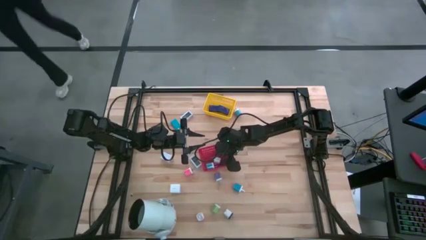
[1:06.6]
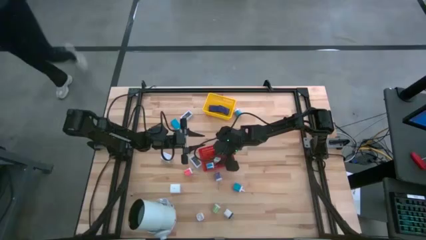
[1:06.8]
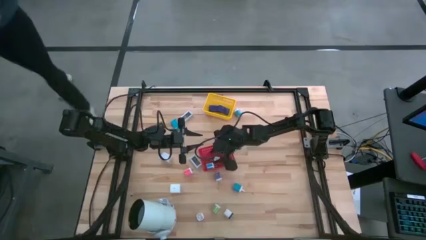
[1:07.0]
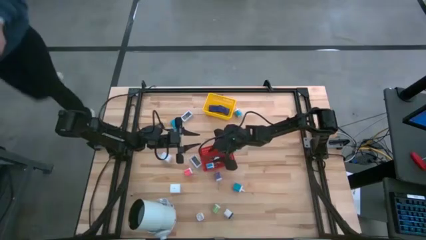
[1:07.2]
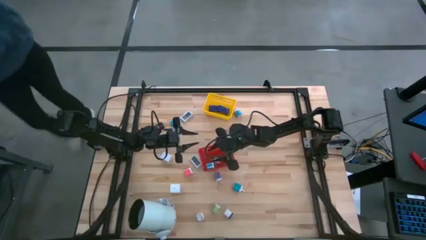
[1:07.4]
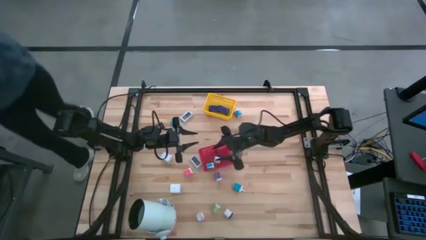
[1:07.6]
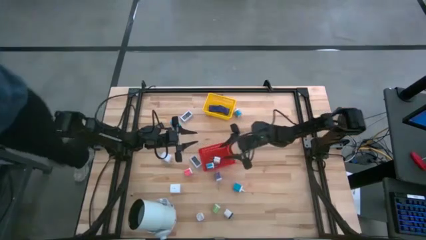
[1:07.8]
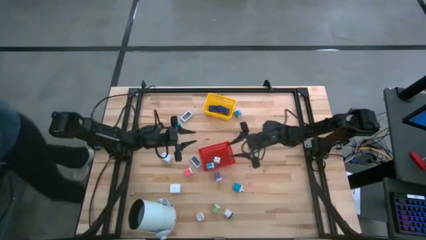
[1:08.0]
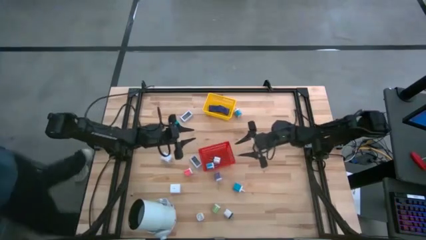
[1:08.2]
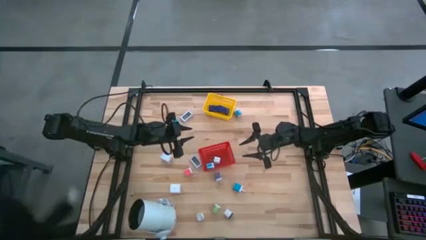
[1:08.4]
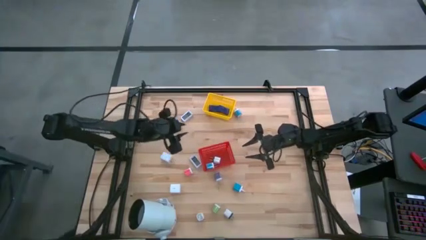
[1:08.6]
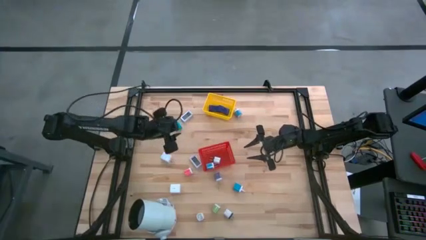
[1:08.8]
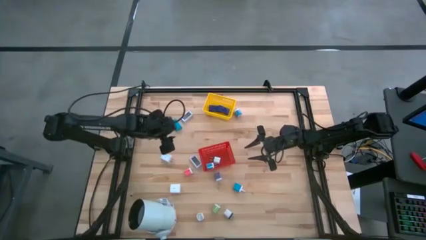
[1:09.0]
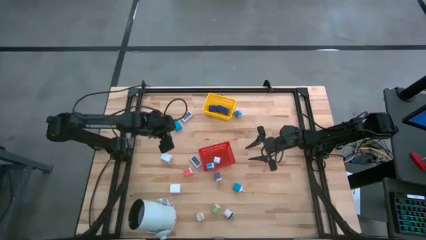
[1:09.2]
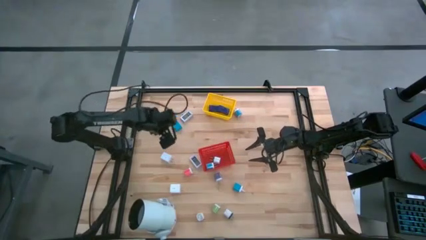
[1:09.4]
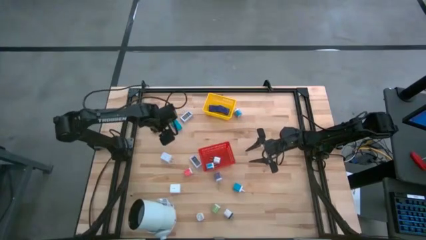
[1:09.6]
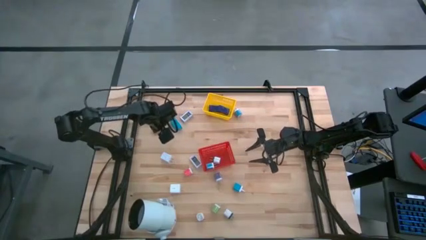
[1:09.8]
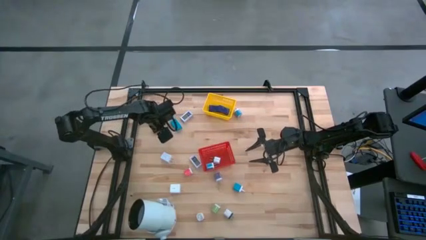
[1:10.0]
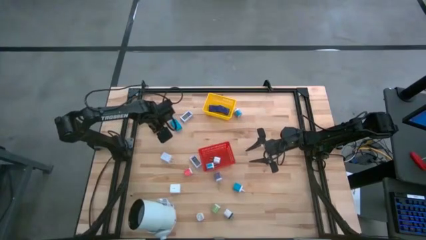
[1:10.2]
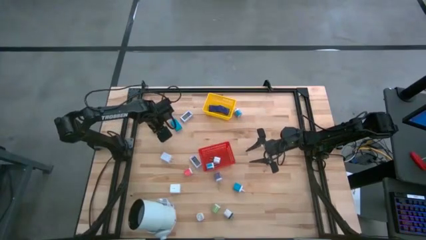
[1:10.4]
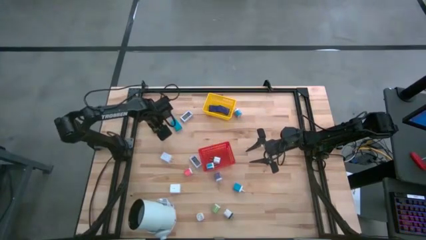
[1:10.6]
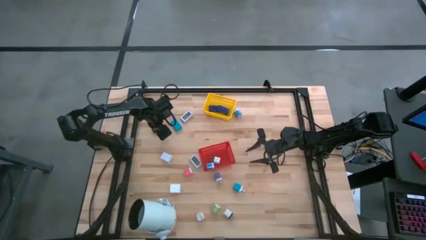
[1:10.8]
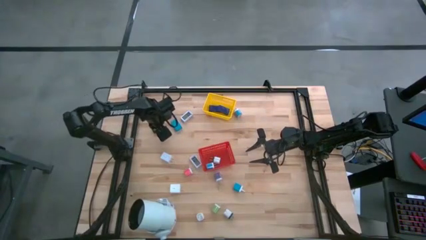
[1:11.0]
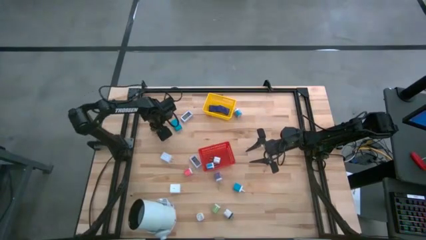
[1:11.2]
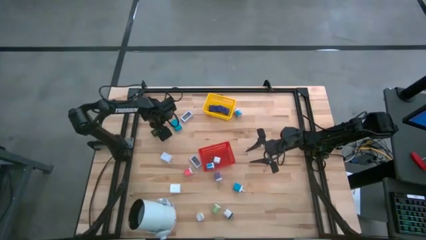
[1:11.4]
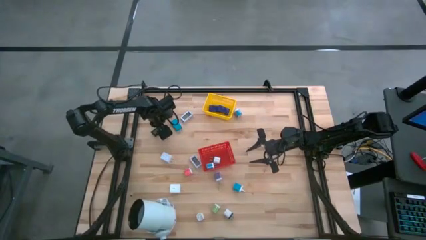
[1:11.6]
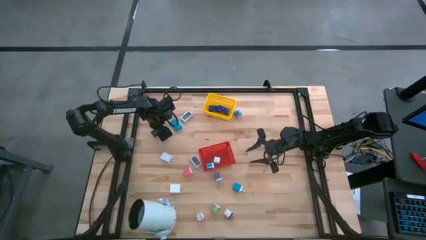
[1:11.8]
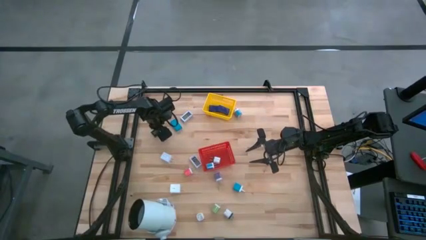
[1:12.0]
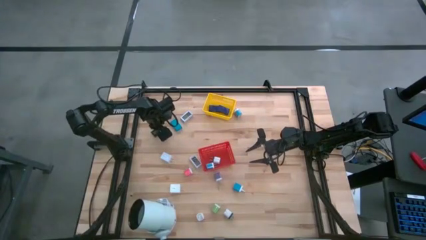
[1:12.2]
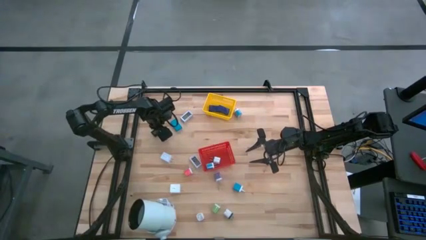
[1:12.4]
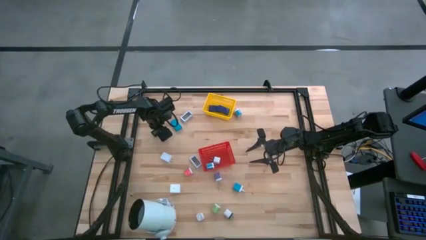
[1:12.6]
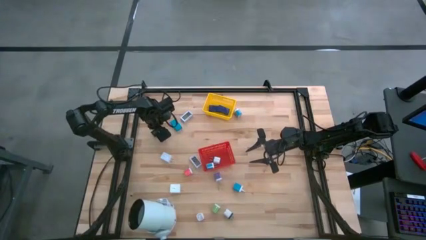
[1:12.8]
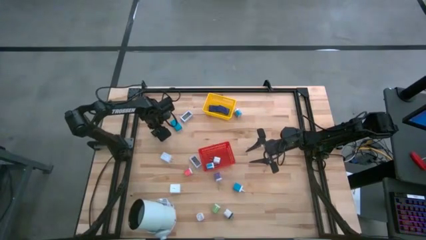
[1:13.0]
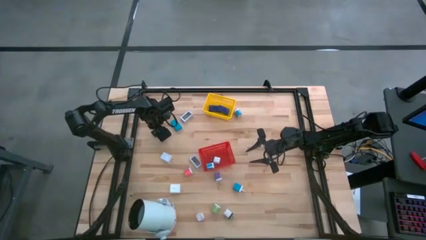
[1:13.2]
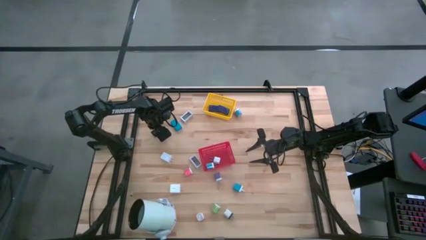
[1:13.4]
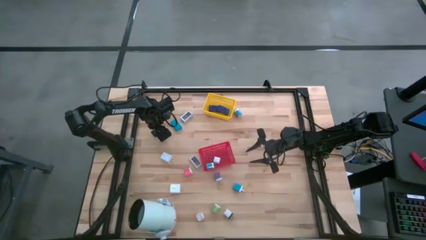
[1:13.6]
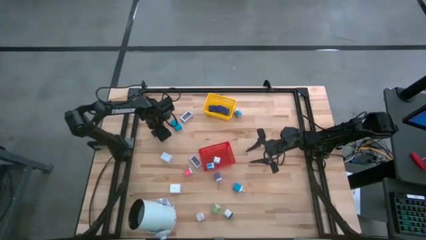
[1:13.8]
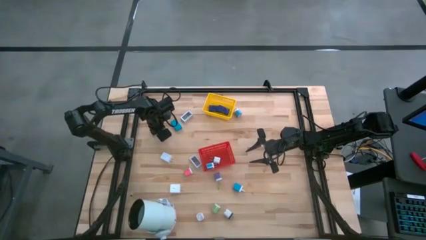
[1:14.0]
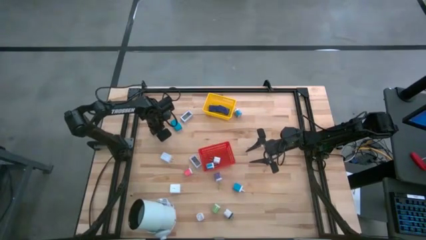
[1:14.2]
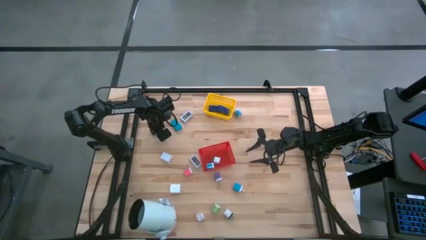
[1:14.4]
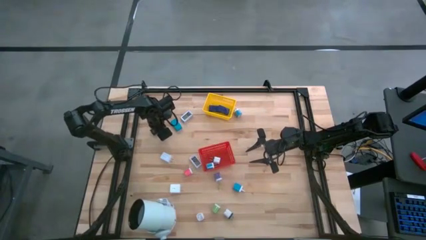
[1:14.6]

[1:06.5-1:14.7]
Task: Pick & Place Office items
Put the black digital clock into the yellow bin

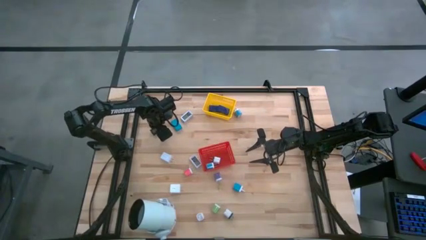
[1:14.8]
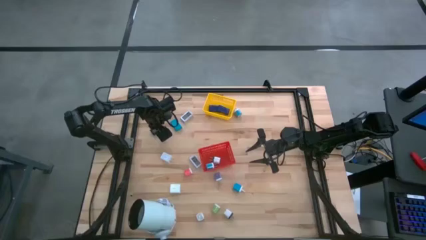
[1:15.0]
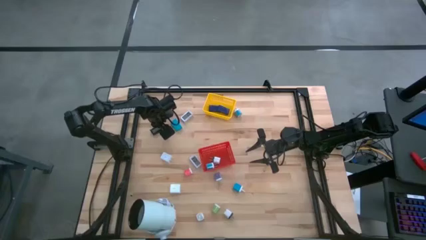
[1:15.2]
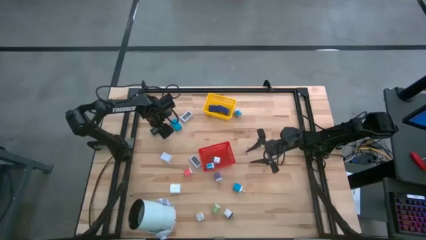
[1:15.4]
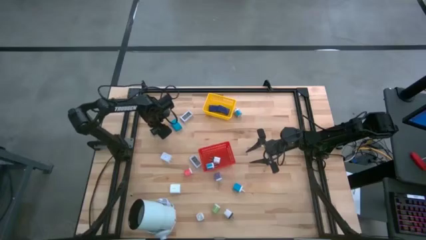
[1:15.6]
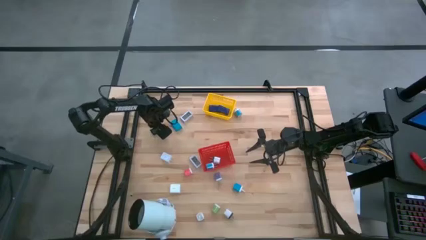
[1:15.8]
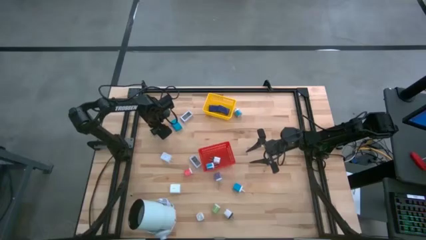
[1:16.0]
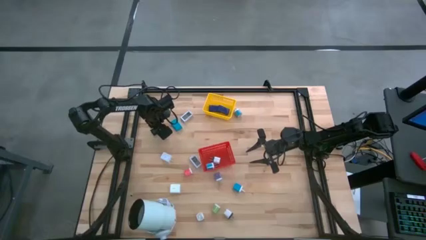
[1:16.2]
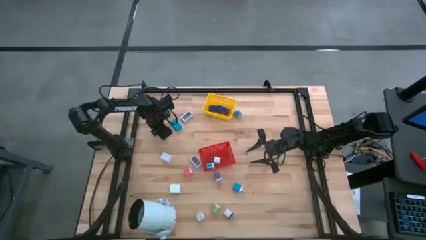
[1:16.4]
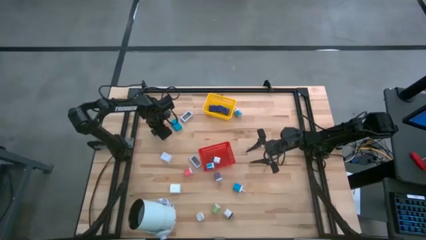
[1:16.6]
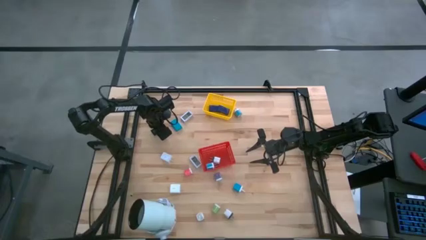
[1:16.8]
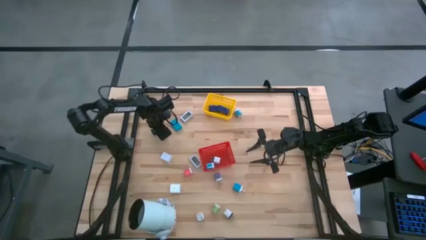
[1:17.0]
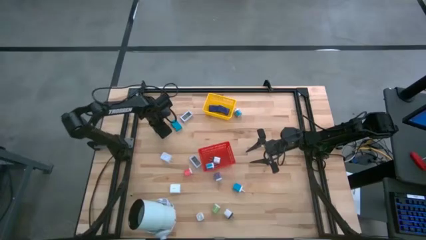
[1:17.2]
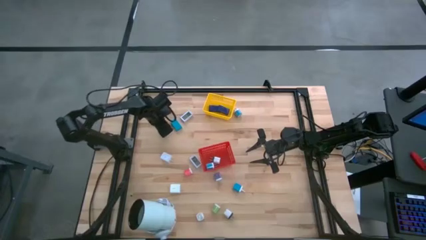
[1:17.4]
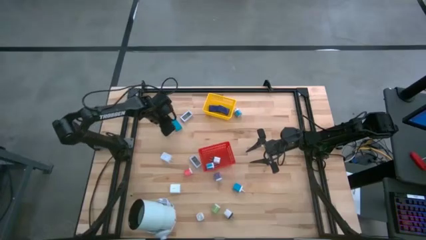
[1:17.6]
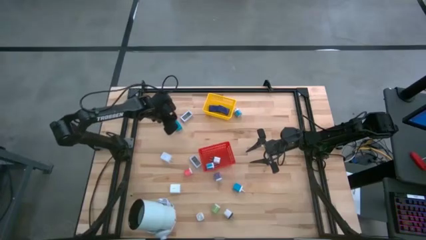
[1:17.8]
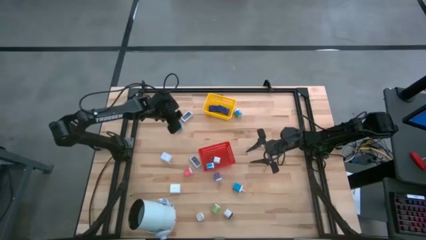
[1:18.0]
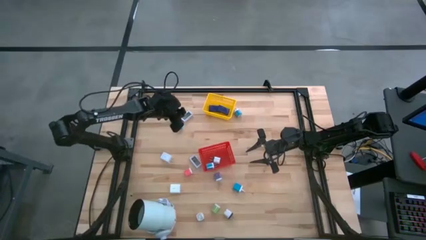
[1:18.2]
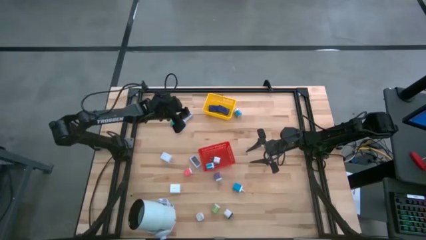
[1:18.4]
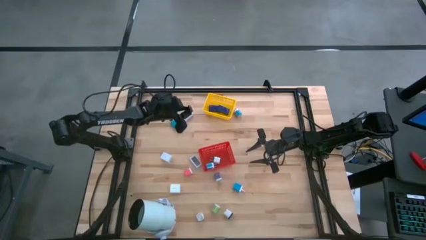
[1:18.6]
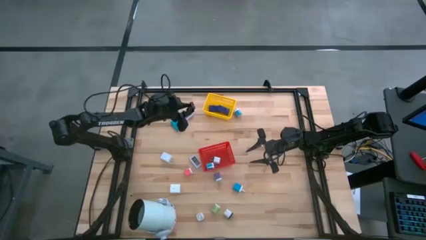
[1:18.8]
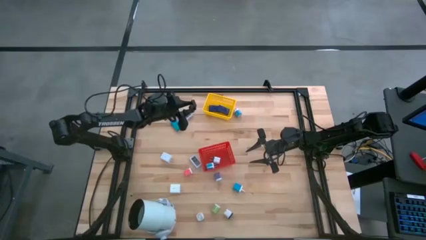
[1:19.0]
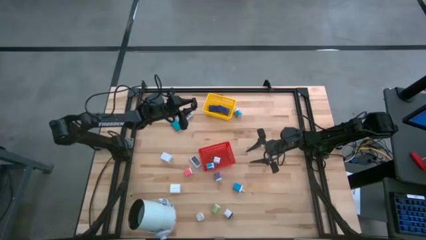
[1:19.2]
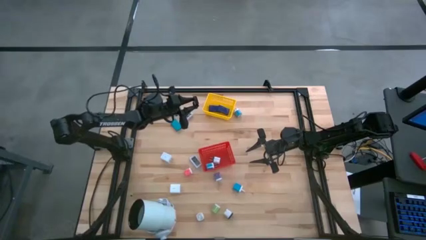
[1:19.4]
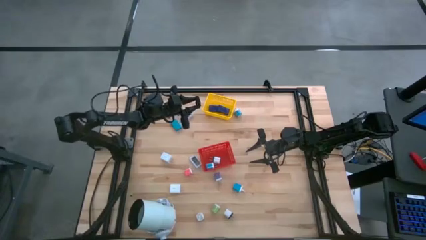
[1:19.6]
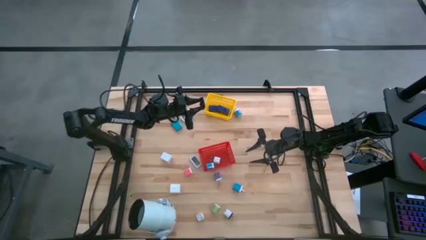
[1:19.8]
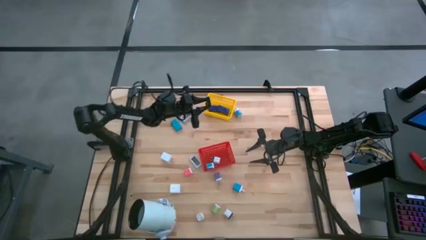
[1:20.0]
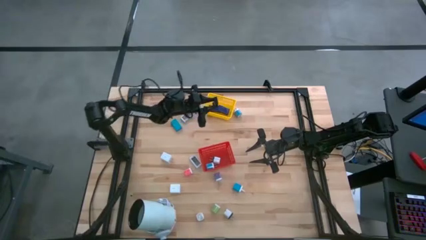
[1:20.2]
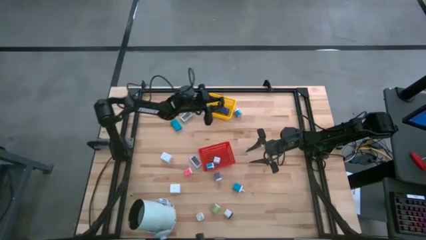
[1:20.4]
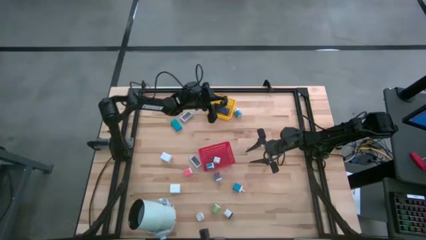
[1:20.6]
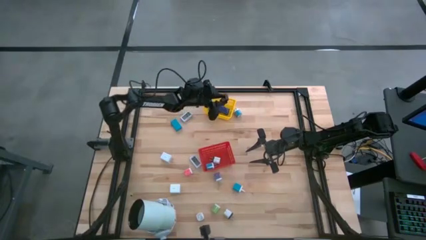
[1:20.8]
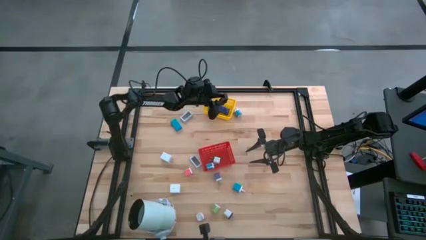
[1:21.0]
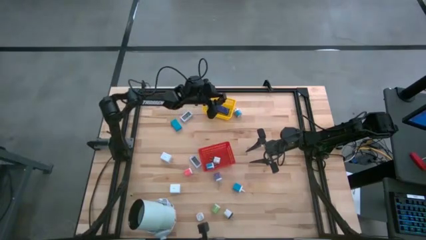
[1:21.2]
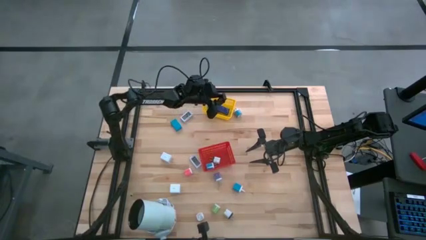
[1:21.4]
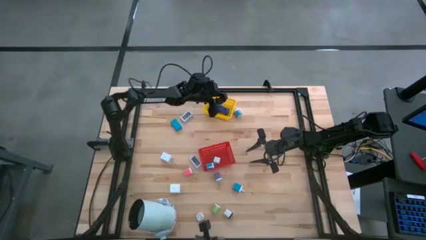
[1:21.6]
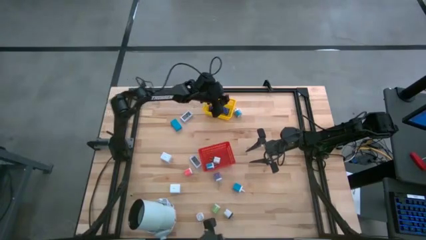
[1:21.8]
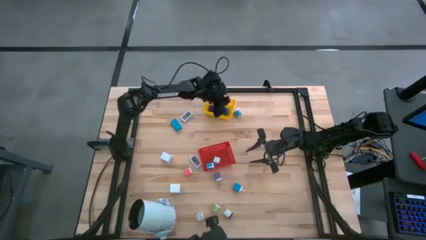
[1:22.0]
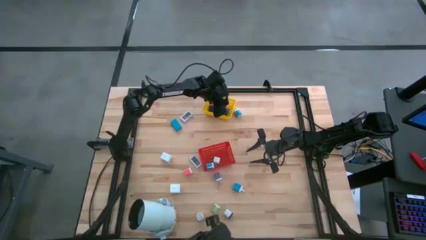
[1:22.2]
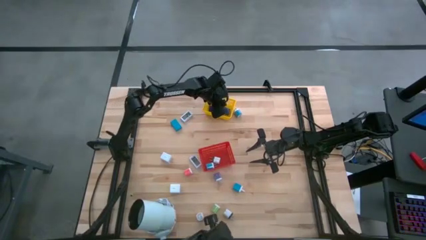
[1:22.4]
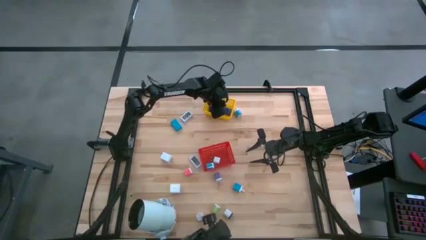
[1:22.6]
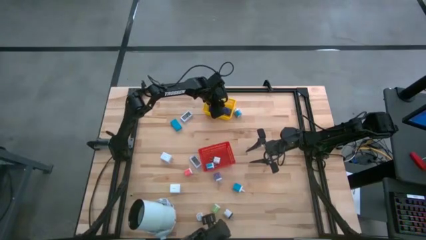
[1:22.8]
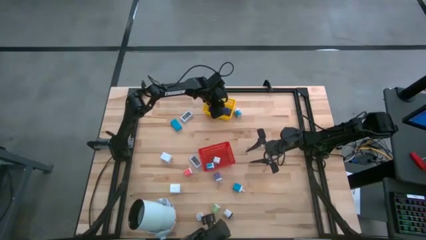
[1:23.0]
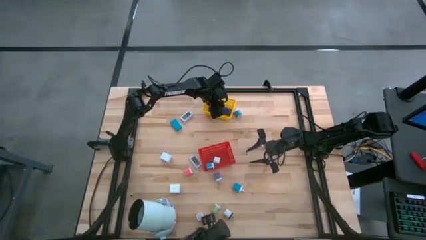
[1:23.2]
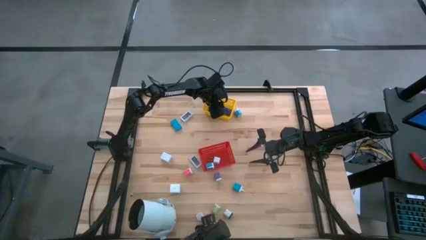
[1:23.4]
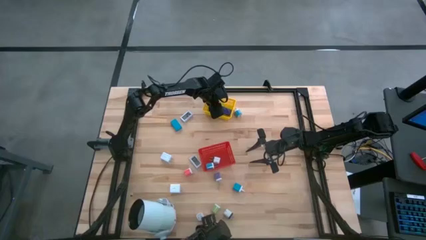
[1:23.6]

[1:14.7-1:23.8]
Put the black digital clock into the yellow bin

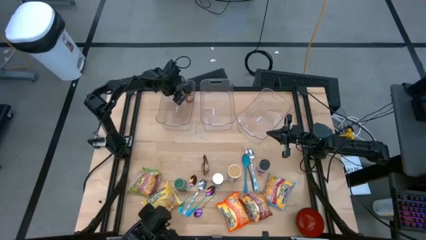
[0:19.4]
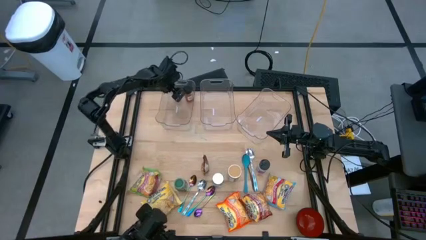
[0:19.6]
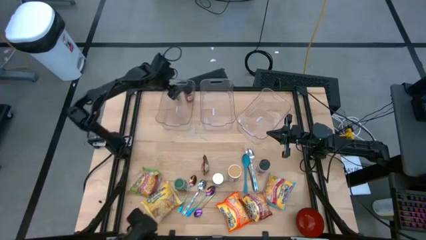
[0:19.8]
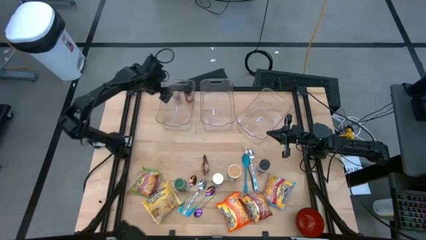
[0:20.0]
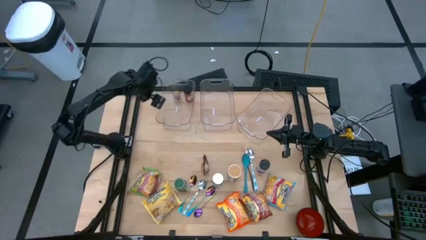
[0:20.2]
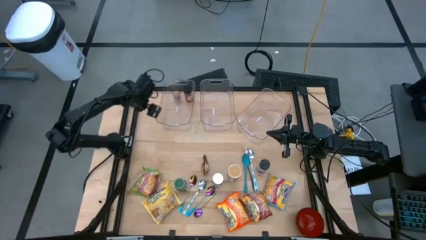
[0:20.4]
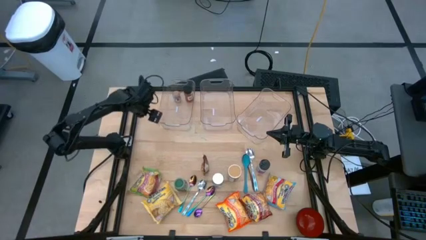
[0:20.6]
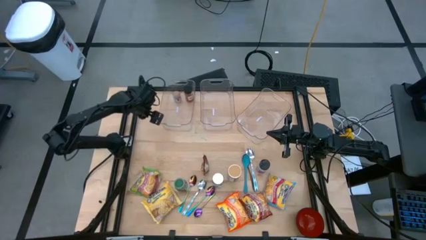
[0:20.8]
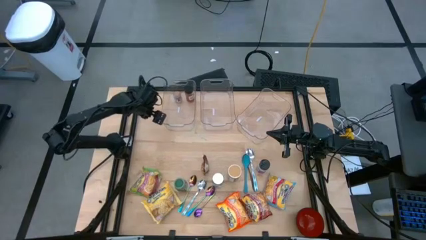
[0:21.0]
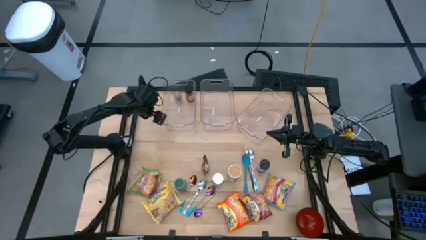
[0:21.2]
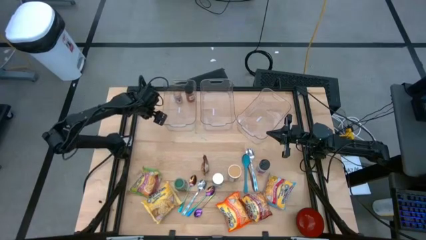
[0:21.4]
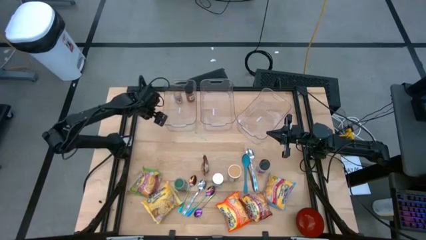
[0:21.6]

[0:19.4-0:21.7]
Task: Pick & Place Food Item
Adjust the left transparent bin
